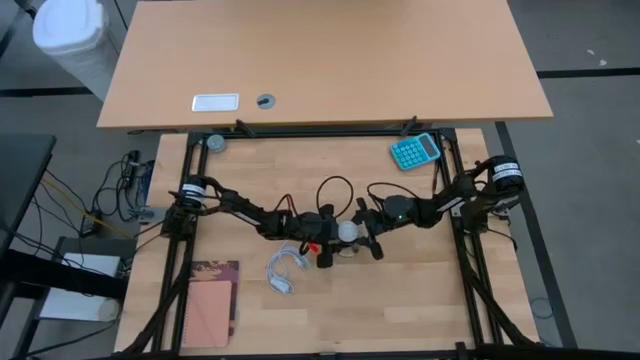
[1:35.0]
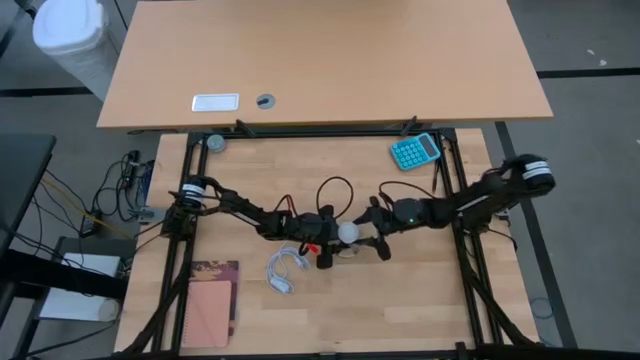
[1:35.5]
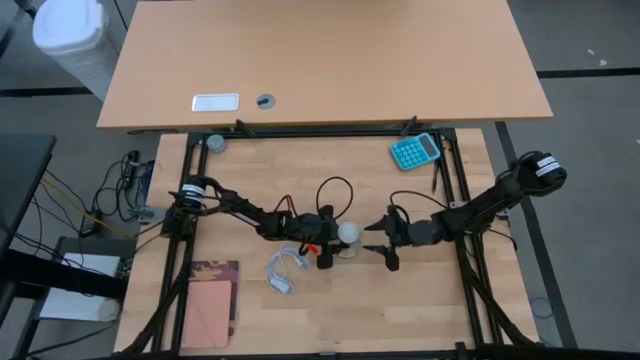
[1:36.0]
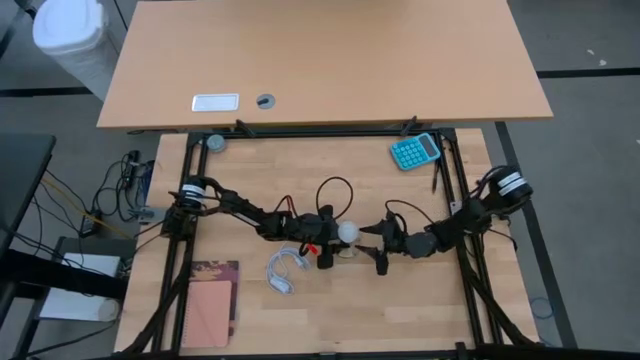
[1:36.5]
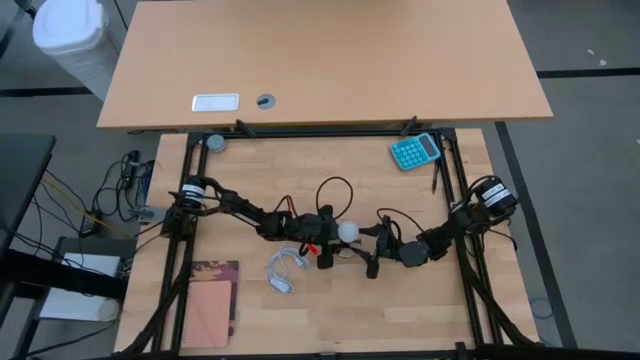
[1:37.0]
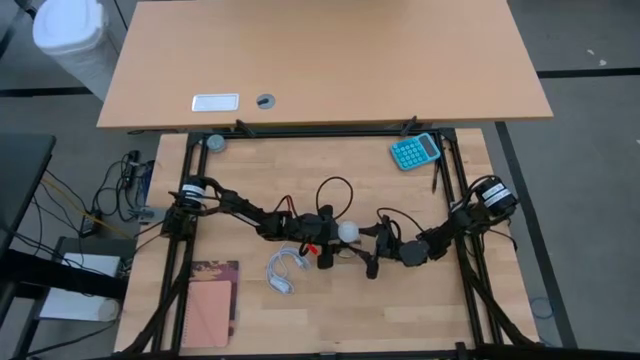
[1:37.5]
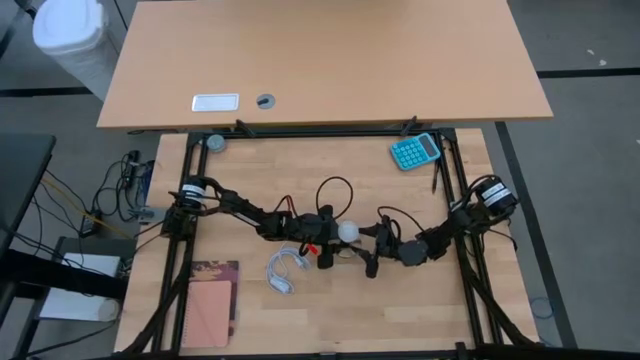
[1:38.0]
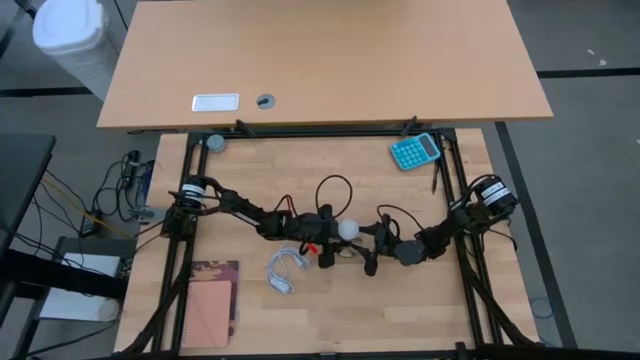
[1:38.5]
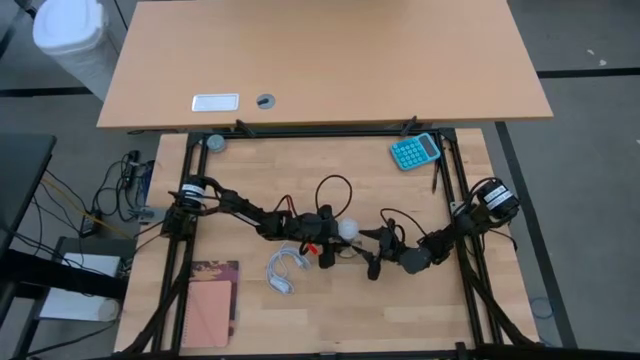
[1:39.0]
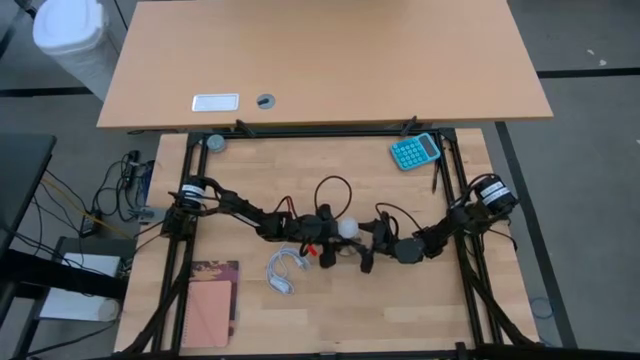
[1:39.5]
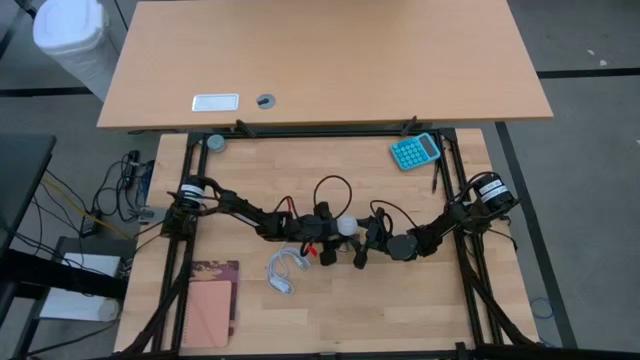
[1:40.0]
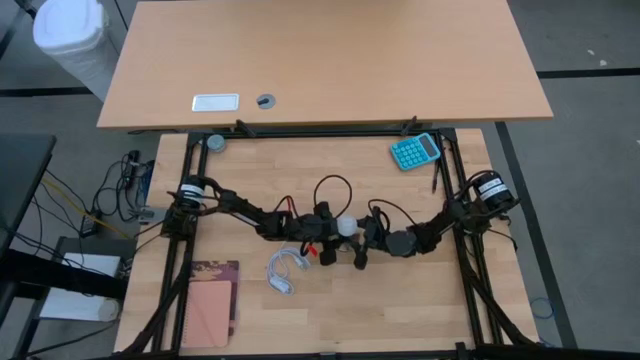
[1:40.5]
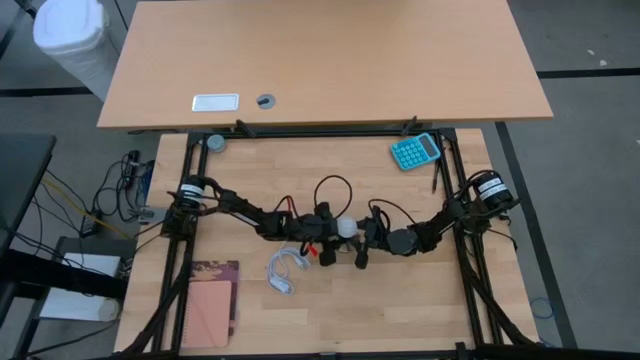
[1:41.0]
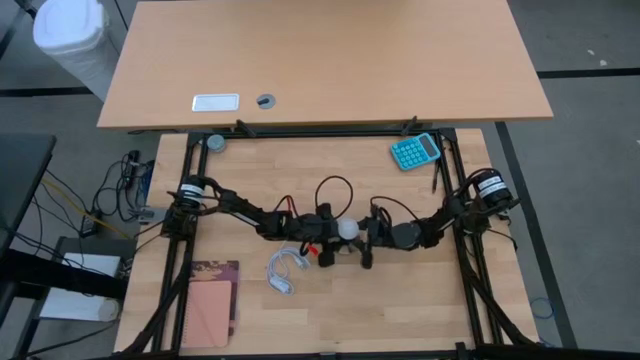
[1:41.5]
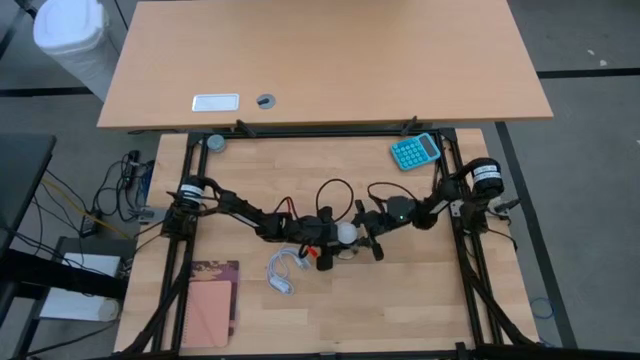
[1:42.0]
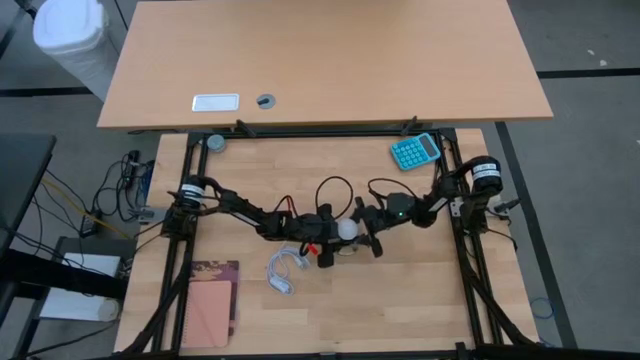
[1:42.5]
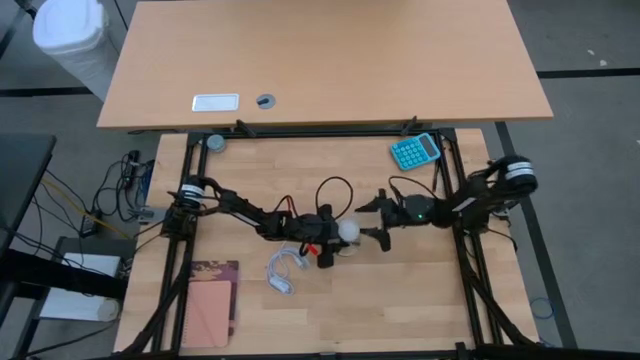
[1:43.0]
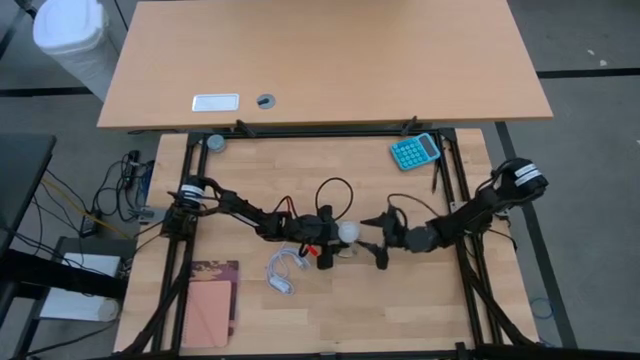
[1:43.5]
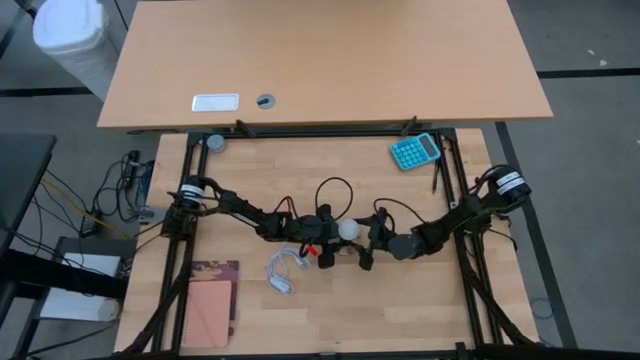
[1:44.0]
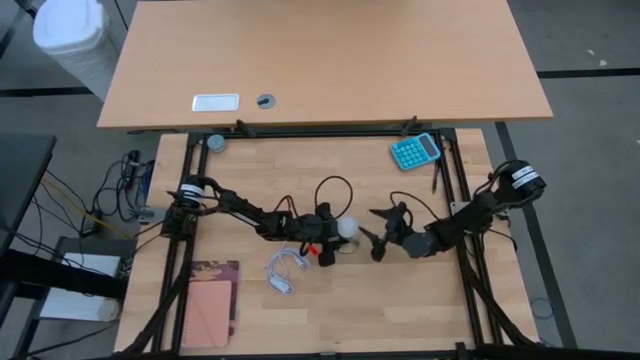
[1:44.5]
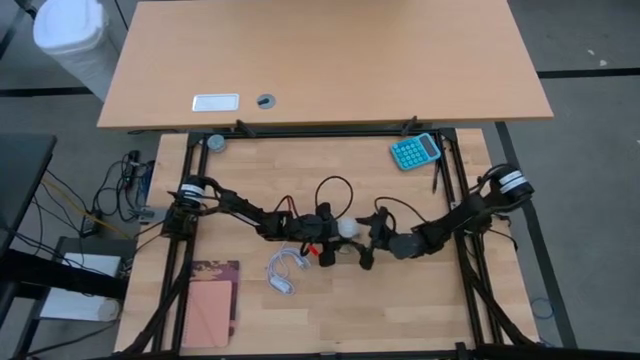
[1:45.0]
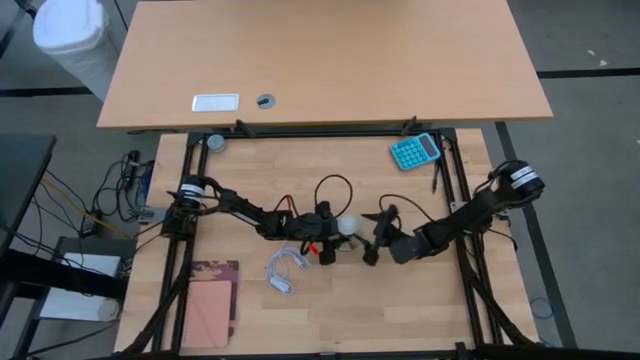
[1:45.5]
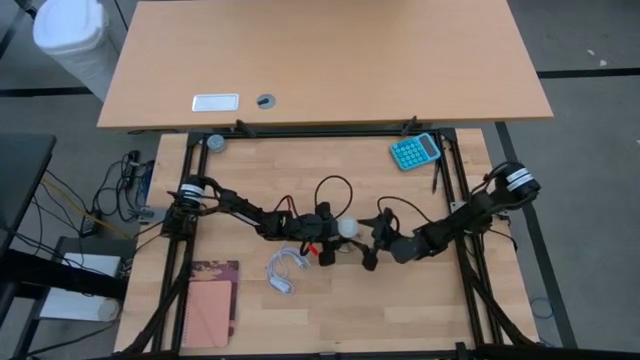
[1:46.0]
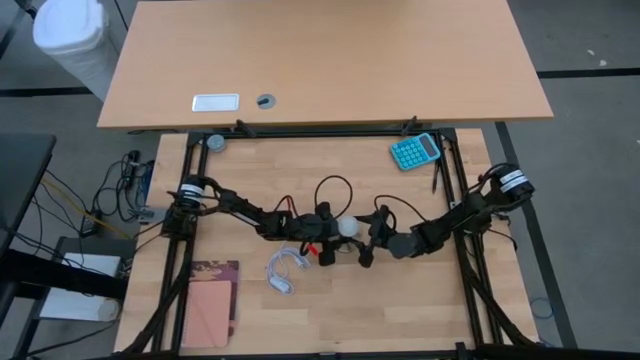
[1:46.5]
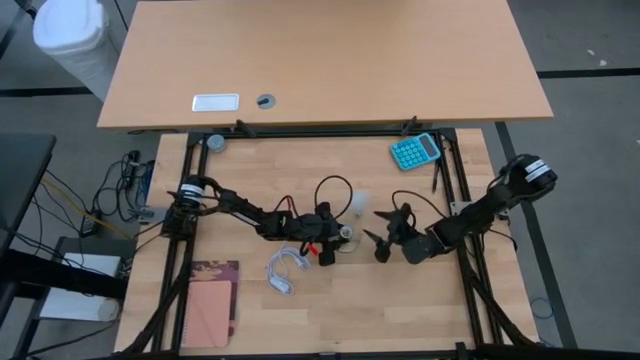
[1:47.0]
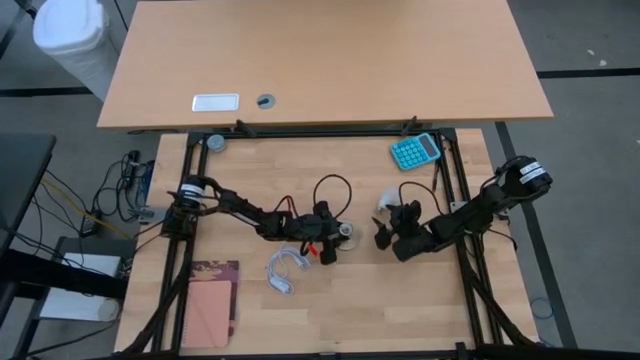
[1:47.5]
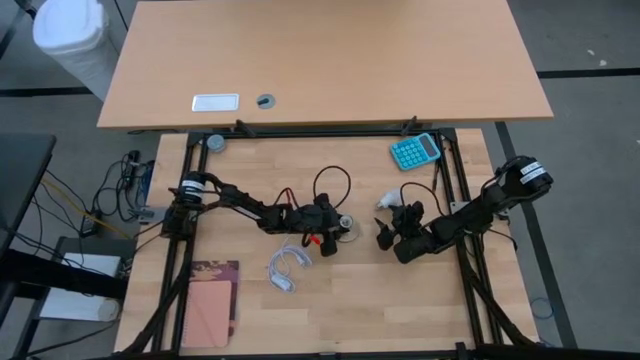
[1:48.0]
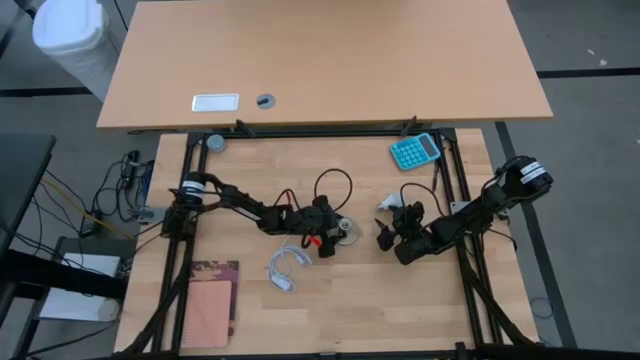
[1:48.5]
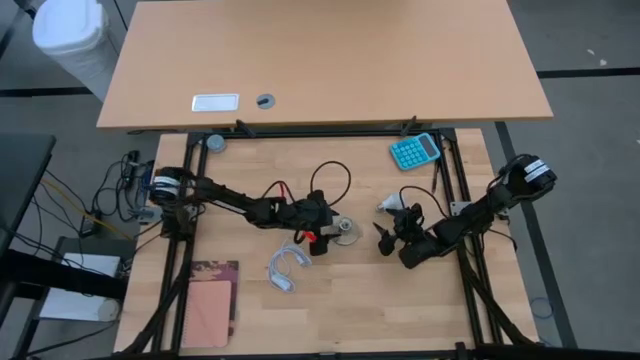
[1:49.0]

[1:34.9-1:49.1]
Task: Screw lightbulb
Remove the lightbulb from the lamp socket

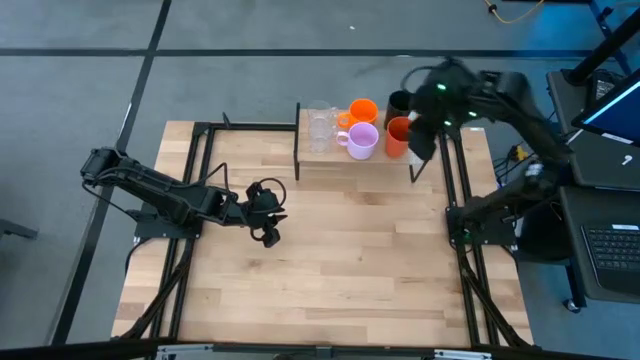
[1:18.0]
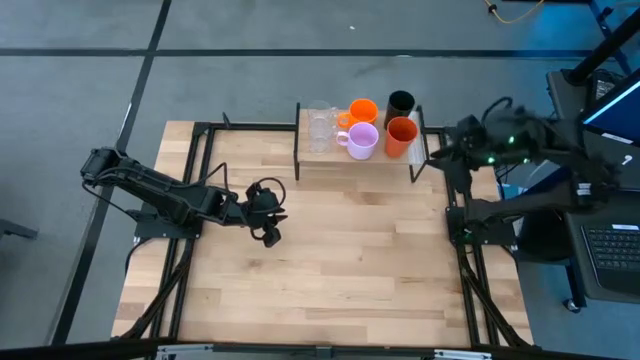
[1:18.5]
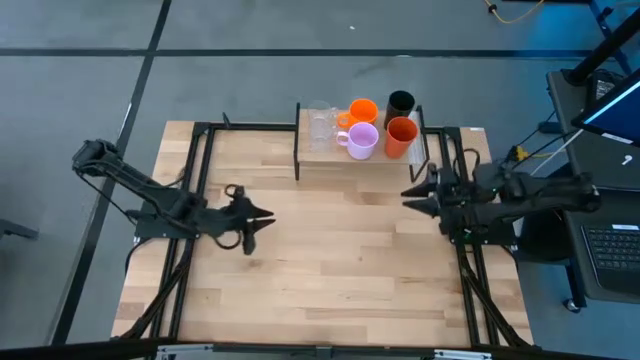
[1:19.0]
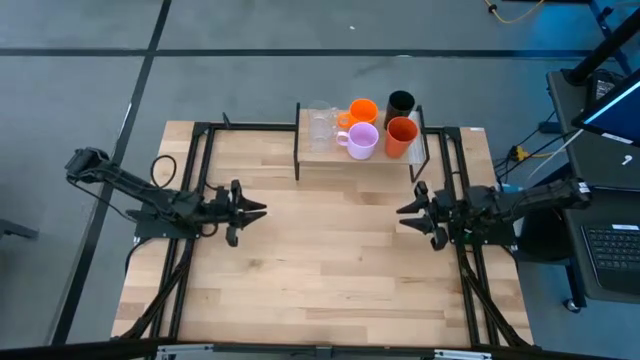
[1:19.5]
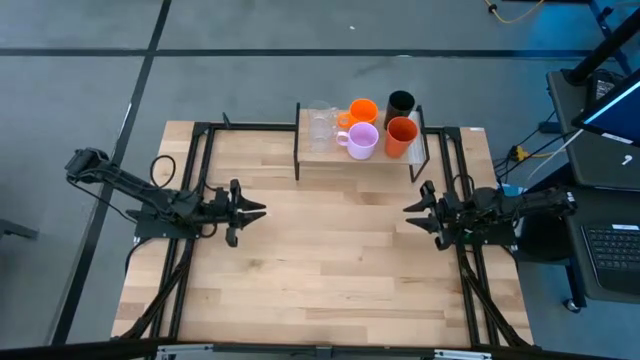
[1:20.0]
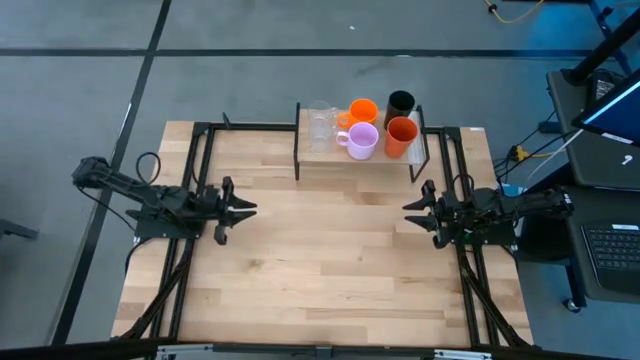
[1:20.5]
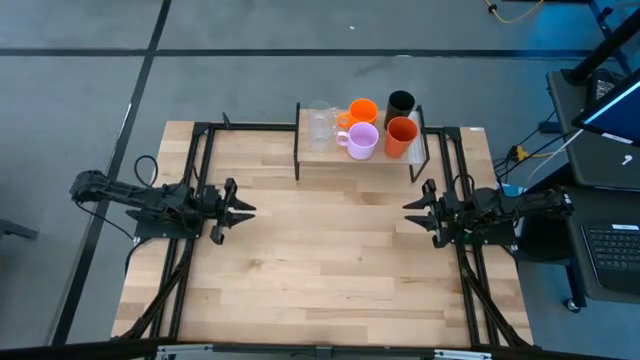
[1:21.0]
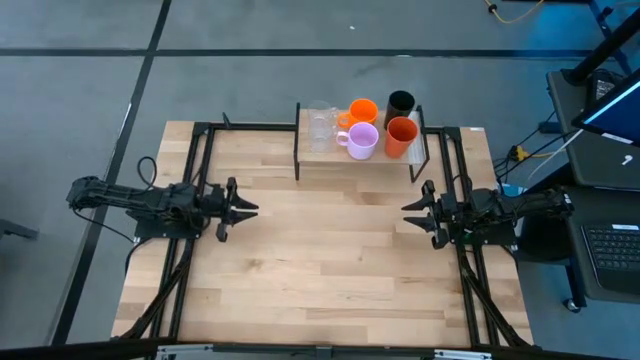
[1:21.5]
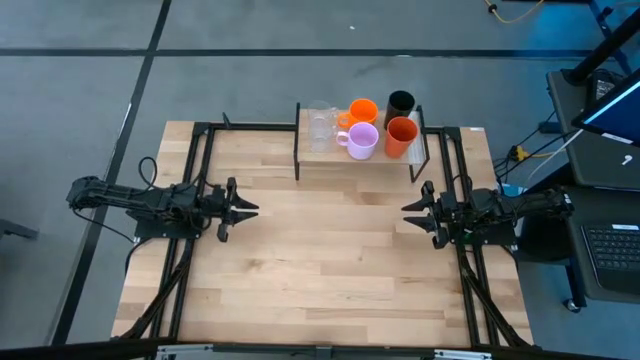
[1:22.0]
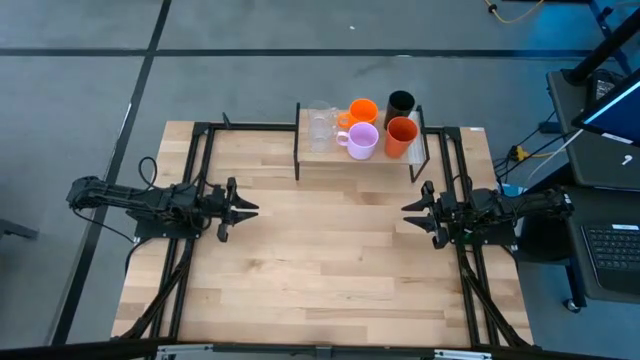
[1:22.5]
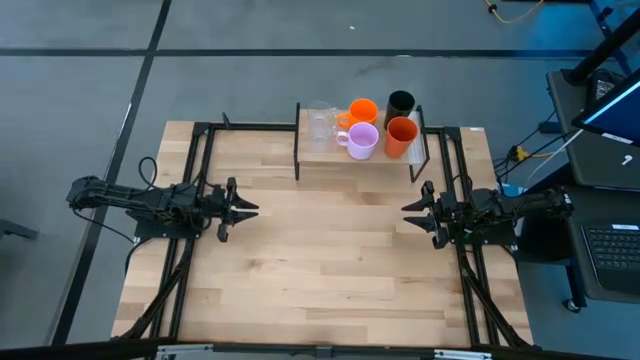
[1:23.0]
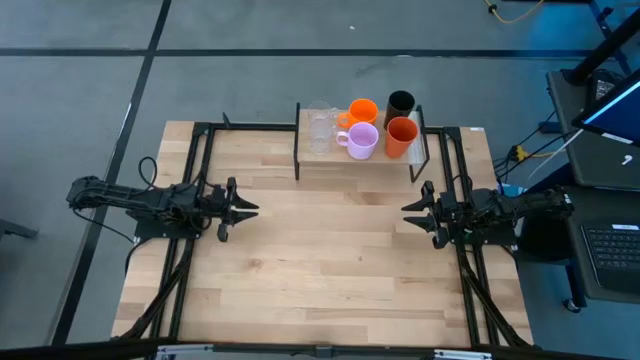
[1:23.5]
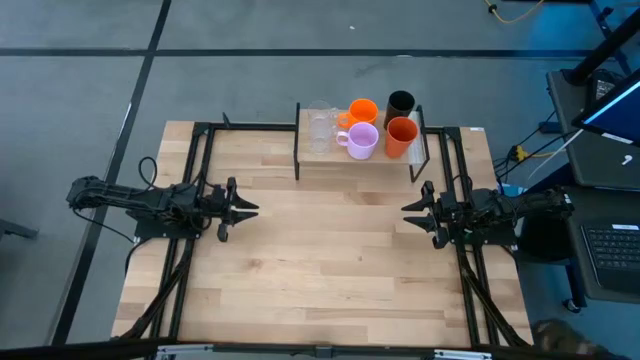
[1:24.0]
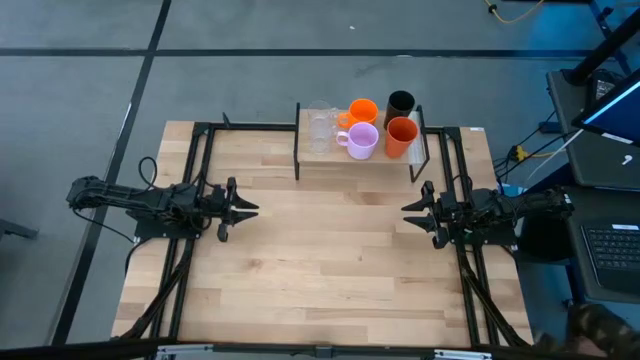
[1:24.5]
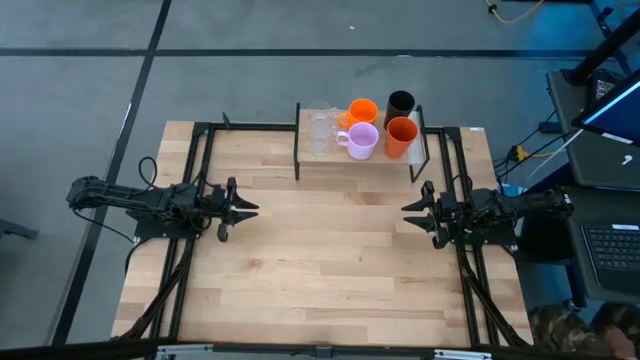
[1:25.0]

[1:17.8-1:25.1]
Task: Stack small to large cups/mugs on shelf
Return to Home Position
